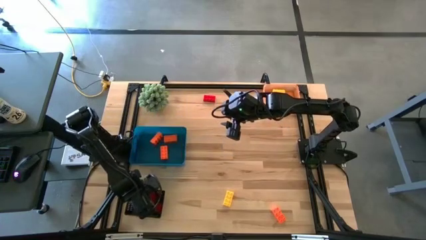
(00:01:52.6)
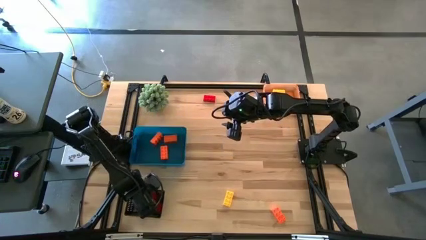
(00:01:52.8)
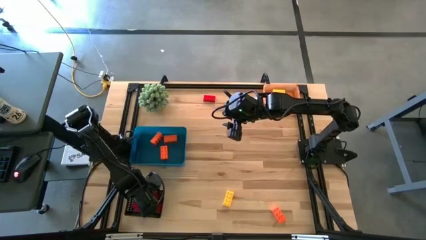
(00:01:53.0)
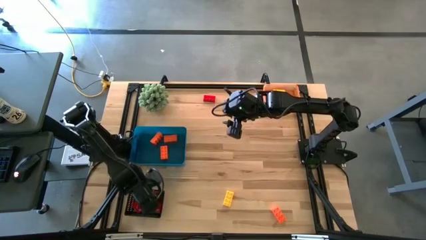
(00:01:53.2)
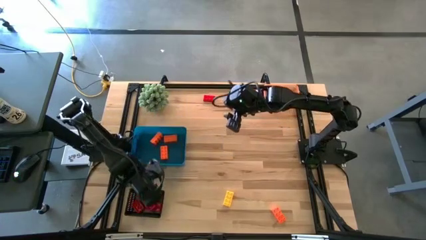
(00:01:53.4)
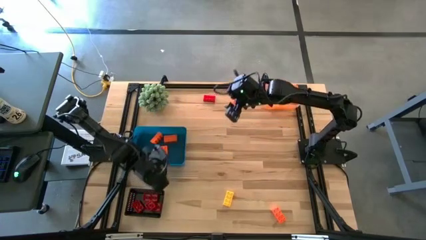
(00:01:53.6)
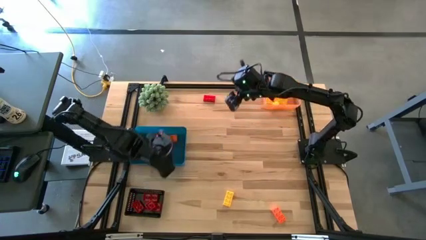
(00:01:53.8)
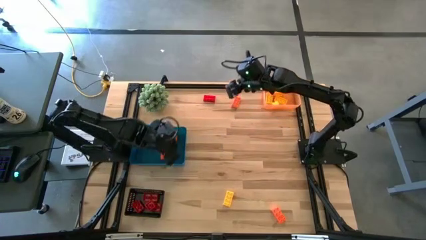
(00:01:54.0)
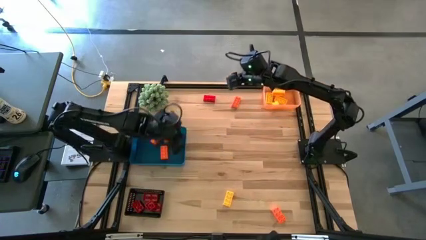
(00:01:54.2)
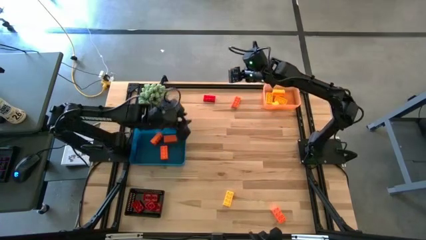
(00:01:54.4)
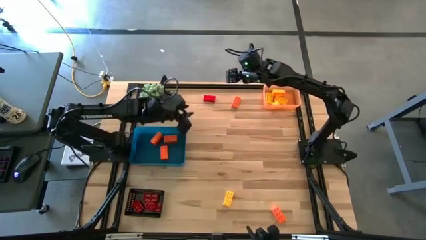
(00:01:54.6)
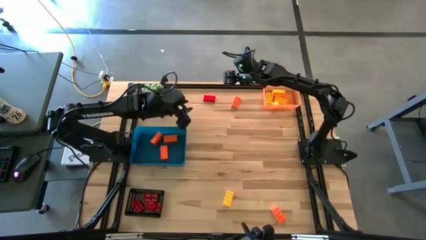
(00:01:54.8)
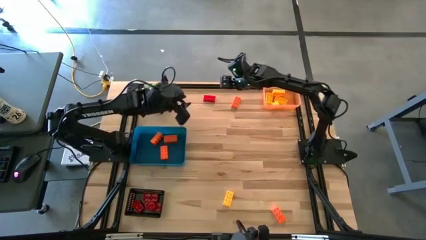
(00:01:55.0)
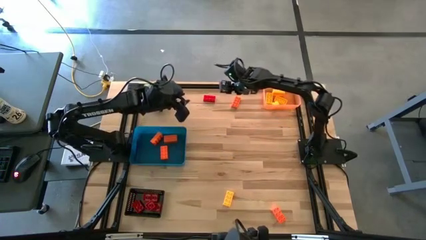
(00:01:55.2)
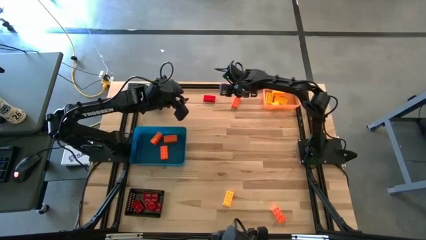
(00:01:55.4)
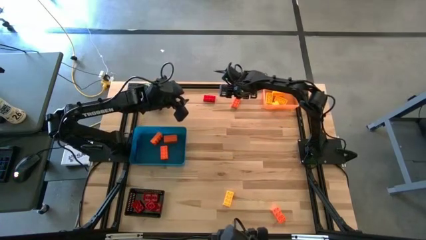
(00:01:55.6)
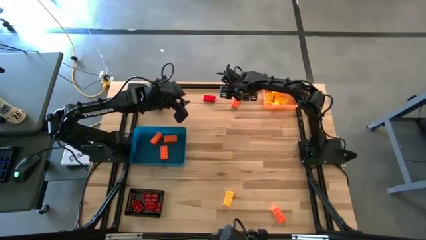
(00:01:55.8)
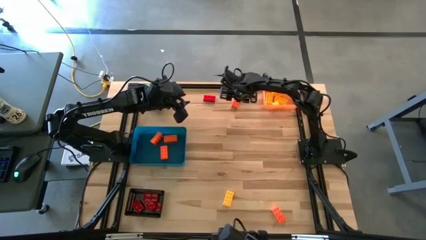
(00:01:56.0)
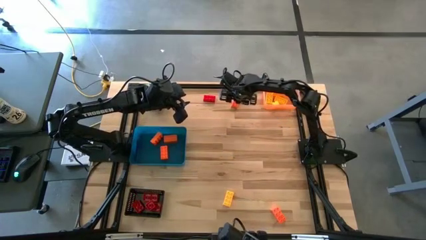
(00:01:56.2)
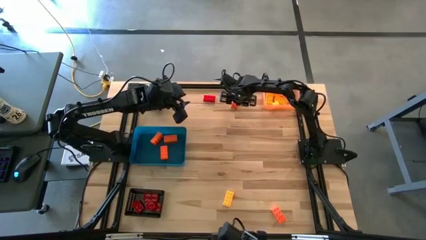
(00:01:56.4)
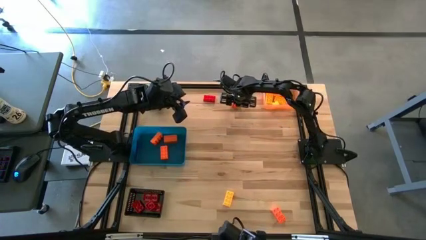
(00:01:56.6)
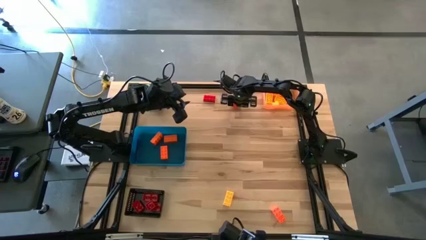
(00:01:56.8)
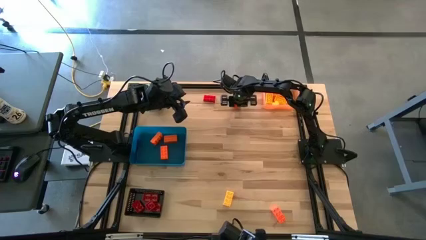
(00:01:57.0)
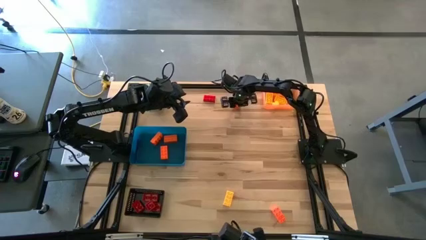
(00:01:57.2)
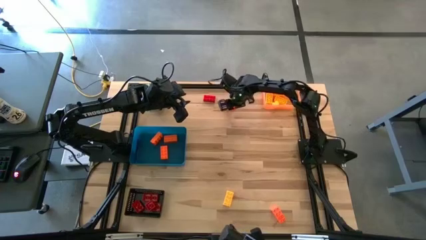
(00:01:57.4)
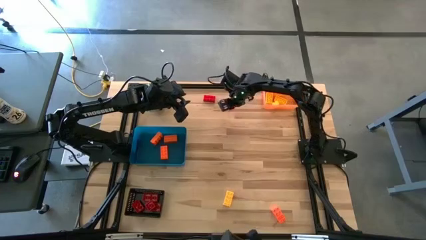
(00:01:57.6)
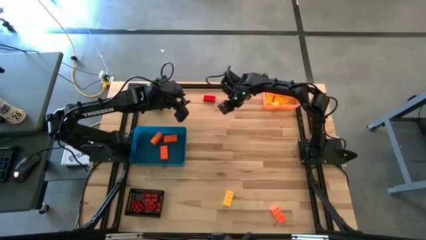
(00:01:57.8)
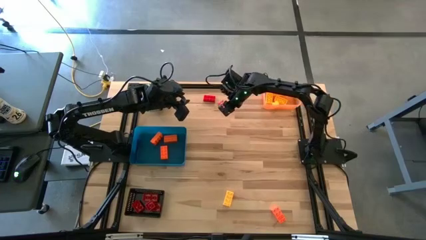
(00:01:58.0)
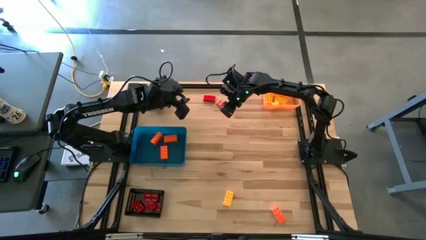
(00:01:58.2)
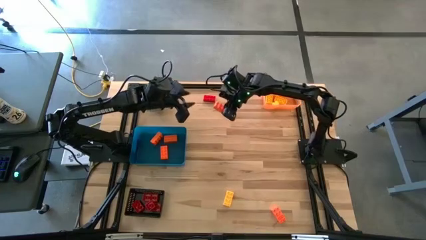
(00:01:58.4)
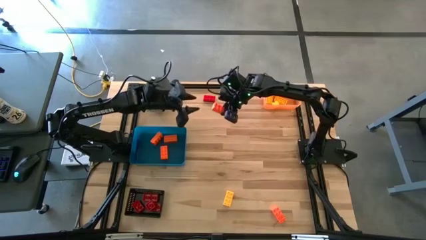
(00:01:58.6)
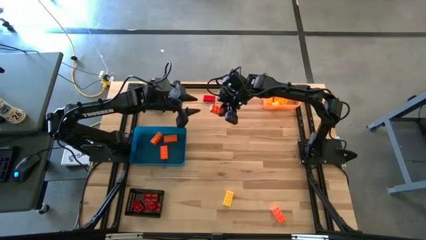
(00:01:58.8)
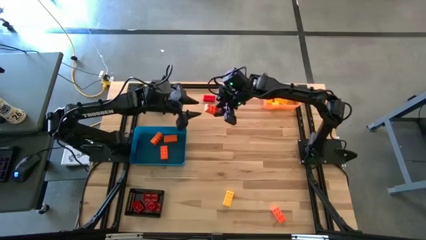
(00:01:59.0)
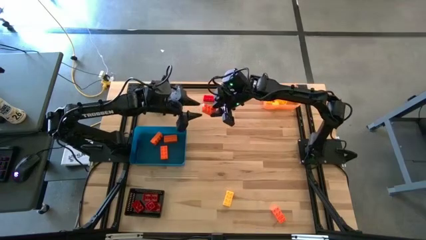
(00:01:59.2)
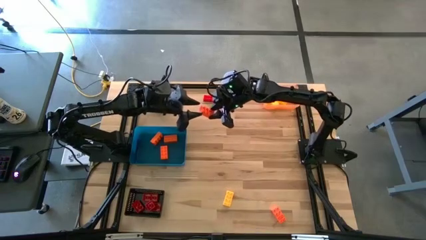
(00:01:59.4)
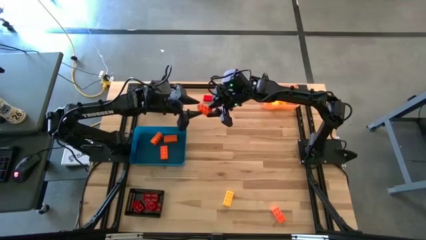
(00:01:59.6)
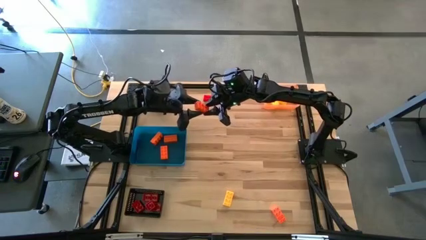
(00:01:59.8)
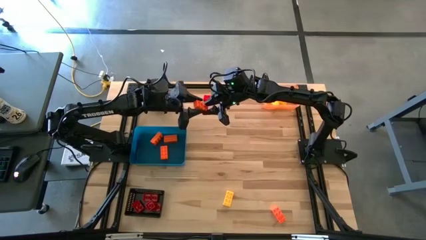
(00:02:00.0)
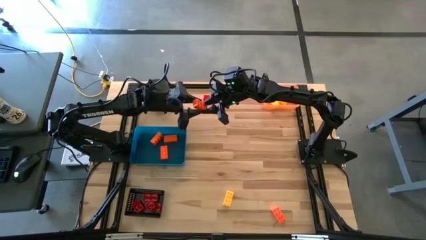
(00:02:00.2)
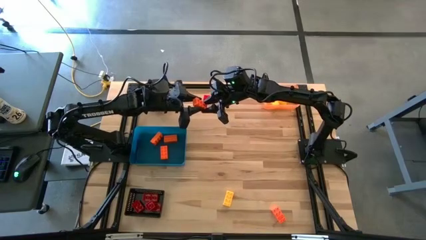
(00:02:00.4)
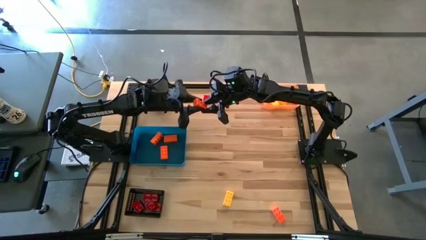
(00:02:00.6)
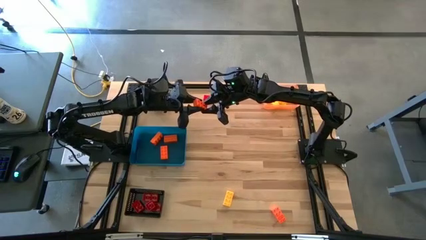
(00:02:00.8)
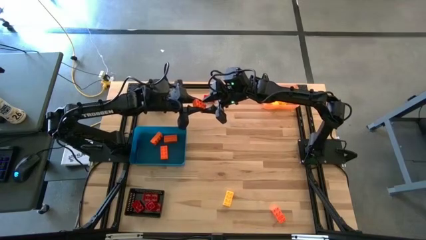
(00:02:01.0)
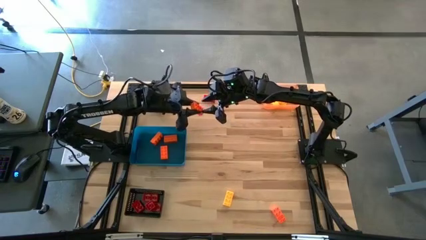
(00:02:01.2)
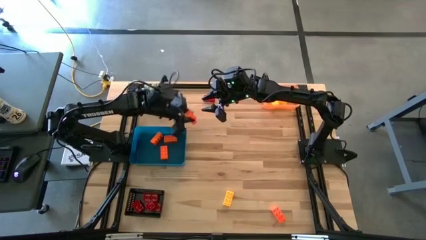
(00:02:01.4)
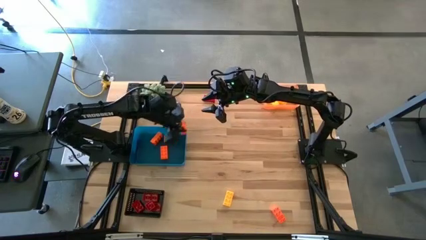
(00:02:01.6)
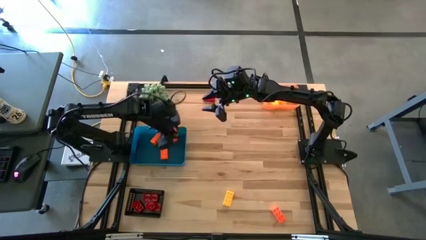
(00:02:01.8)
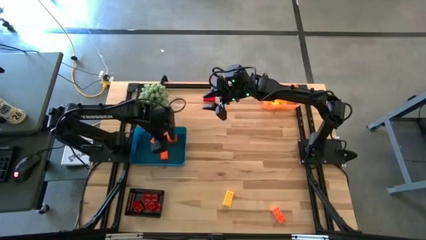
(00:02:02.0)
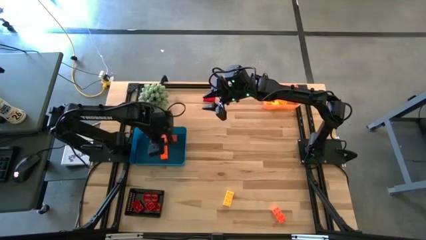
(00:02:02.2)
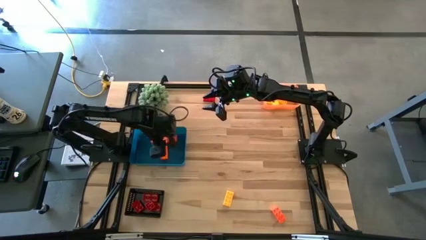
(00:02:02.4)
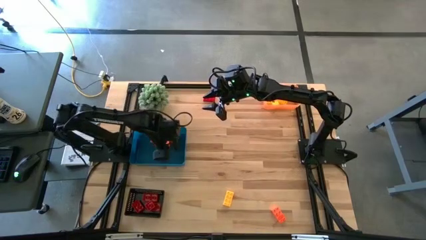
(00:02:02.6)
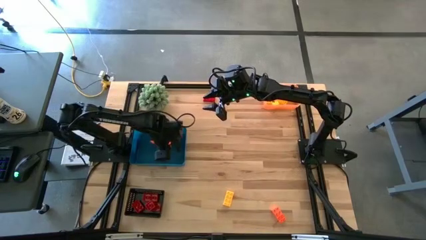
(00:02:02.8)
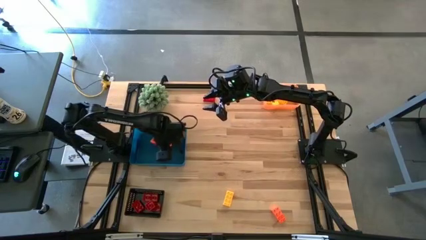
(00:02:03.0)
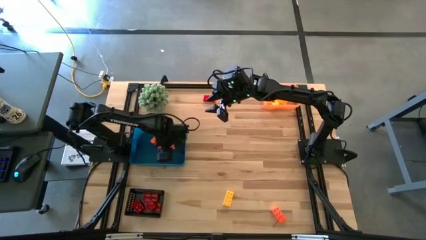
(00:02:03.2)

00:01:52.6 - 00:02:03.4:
Task: Sort & place blocks by color
Put the orange game piece into the blue bin

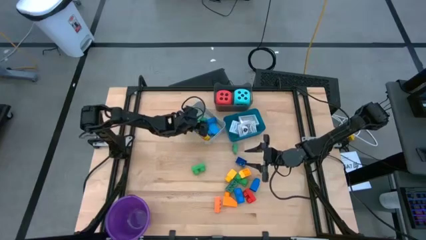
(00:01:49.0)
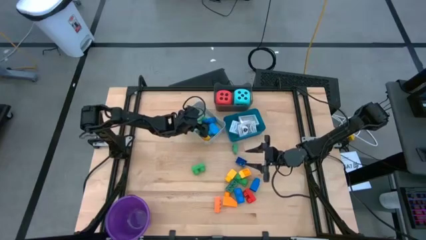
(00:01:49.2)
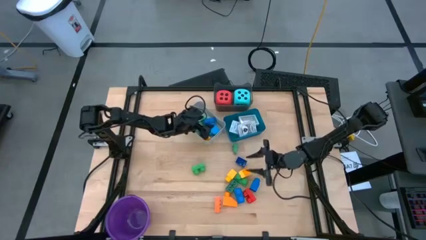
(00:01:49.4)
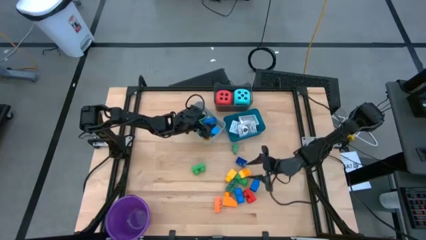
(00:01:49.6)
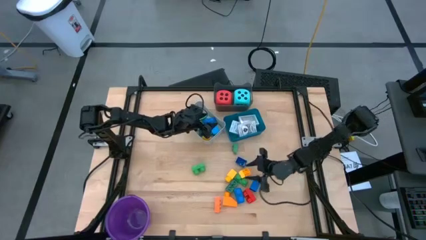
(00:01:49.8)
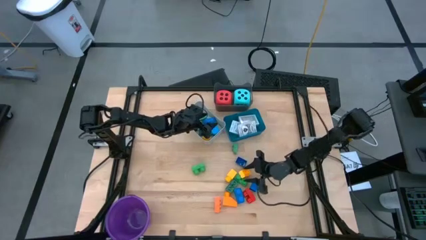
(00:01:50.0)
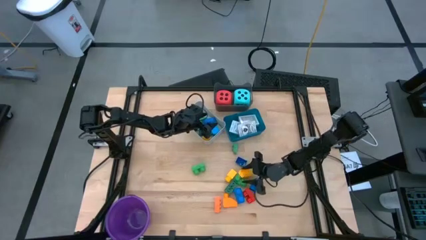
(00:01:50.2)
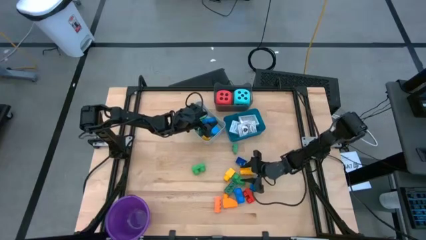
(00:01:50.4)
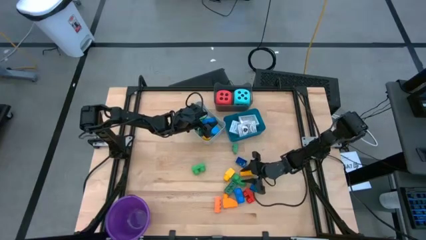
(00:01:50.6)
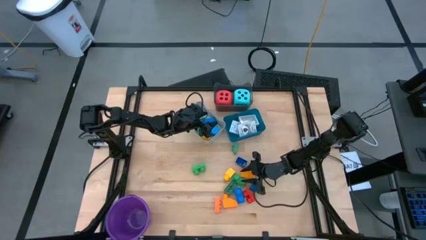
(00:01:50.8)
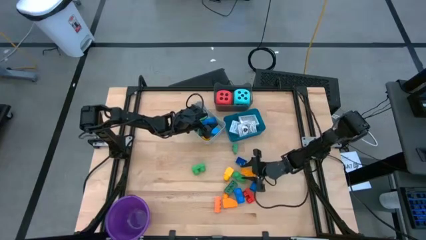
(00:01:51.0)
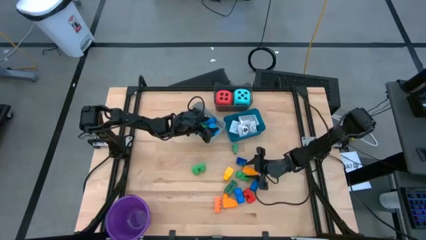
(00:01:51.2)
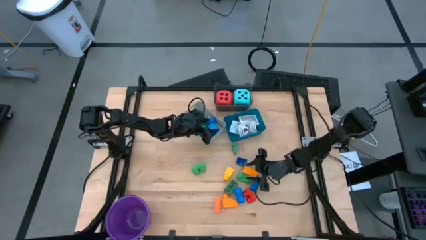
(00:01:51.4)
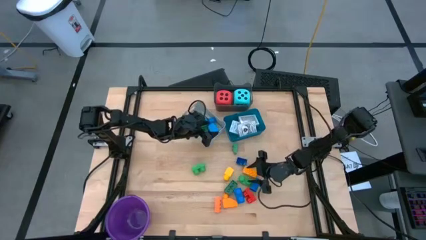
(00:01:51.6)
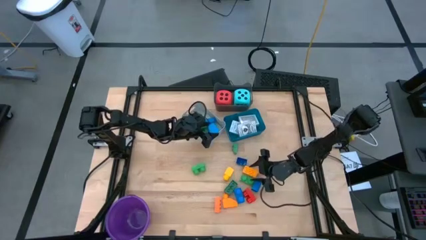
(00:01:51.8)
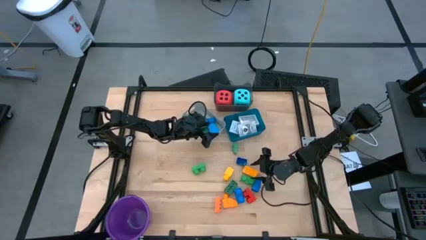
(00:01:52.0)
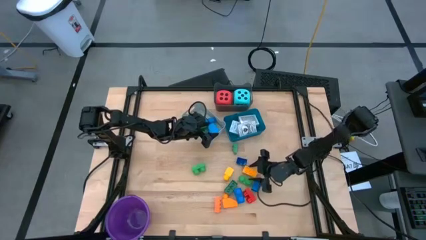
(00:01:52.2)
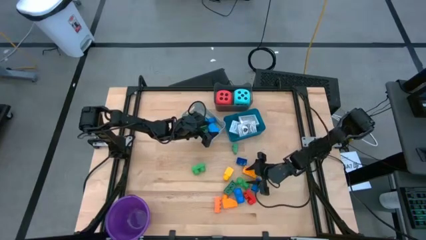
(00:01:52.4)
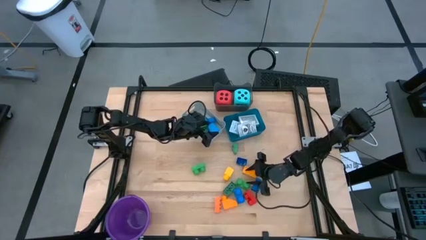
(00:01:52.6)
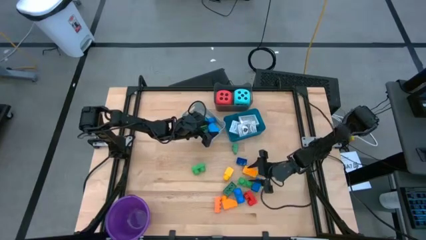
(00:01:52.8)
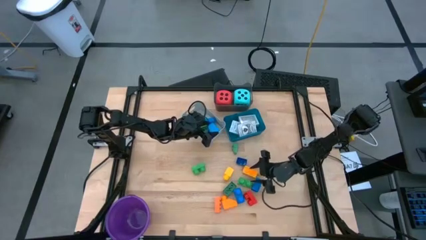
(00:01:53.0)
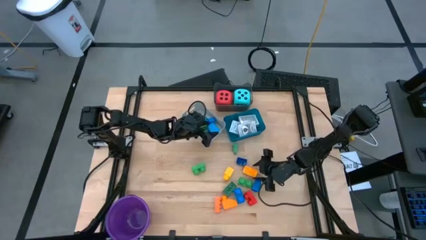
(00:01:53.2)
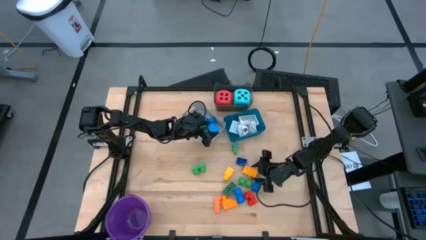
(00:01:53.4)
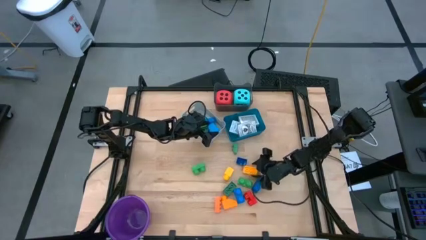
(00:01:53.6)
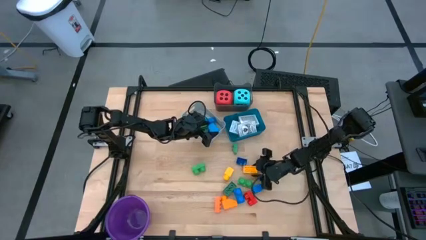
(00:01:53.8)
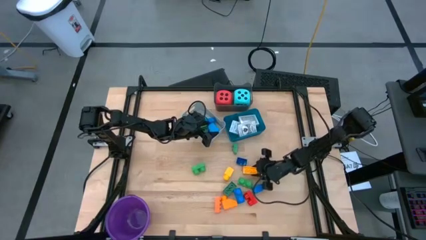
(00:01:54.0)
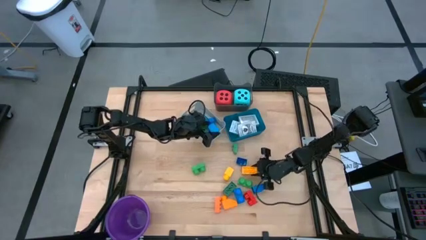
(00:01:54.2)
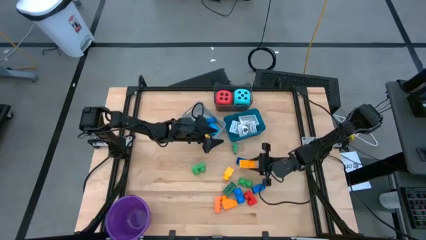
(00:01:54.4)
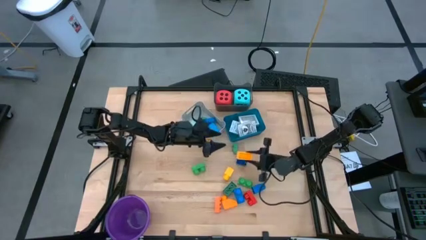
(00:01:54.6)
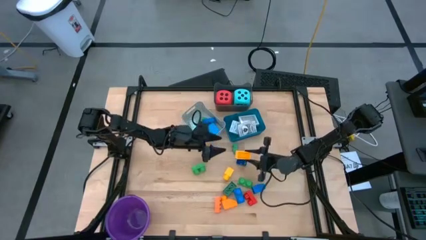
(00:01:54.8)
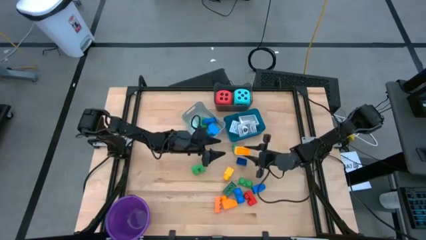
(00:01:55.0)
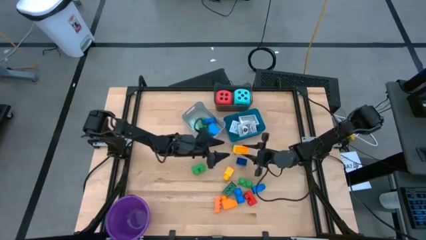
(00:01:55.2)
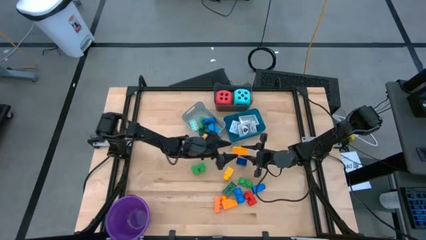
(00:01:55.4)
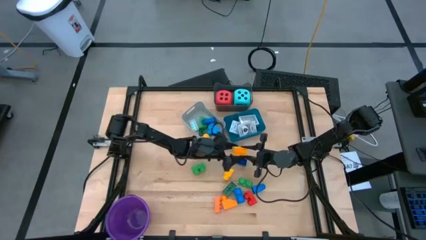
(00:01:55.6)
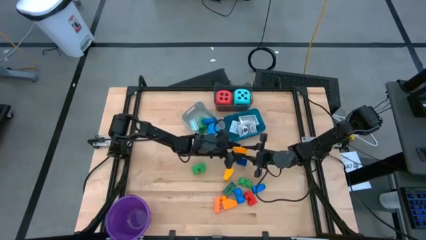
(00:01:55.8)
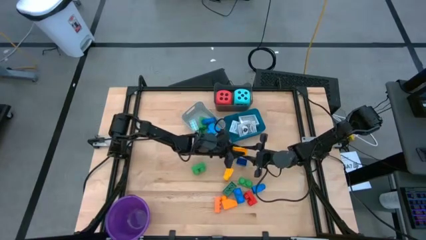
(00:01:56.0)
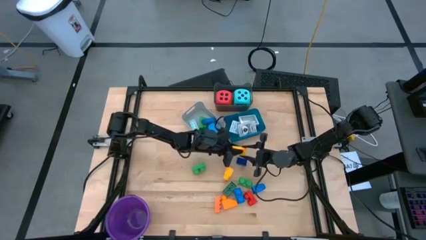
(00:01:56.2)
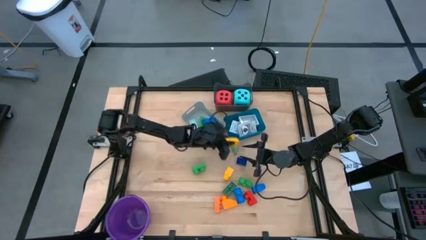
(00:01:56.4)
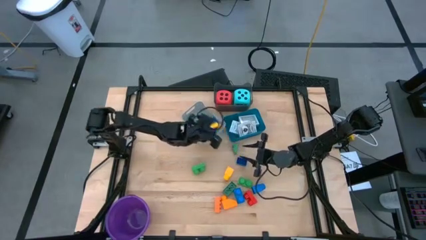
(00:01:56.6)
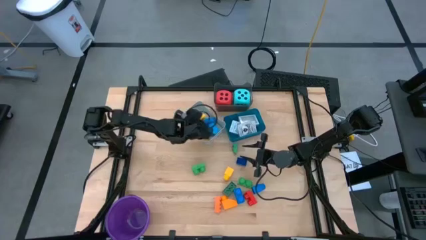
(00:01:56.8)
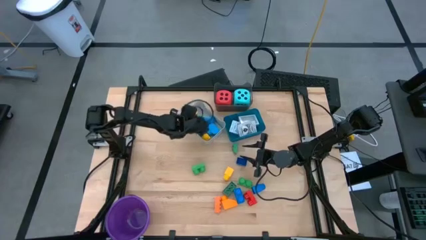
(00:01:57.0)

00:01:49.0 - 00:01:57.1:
Task: Pick & Place Toys
Put the yellow game piece into the gray bin
